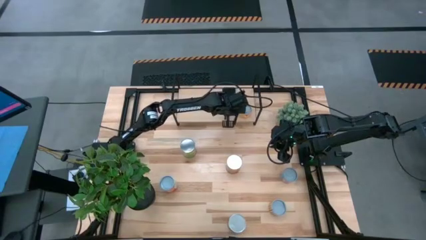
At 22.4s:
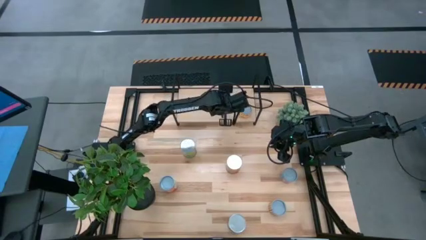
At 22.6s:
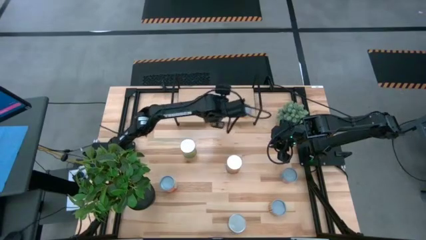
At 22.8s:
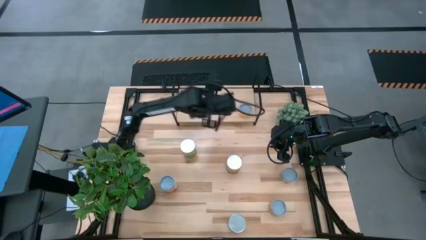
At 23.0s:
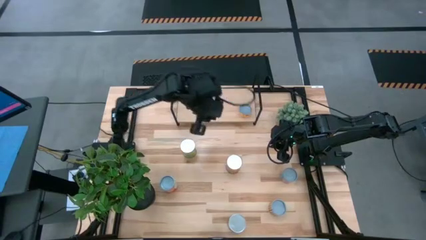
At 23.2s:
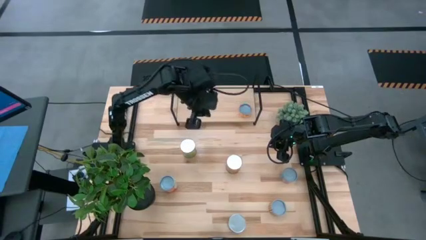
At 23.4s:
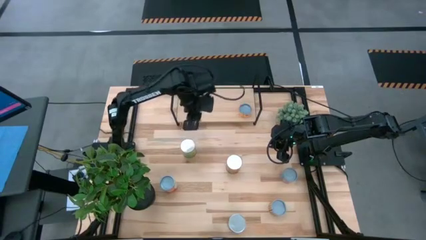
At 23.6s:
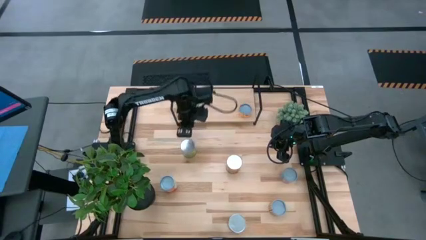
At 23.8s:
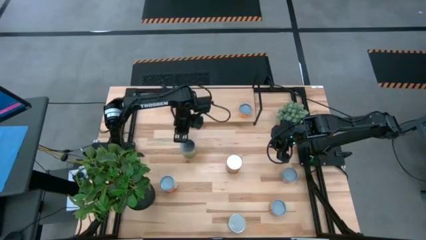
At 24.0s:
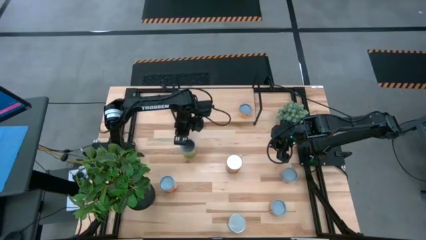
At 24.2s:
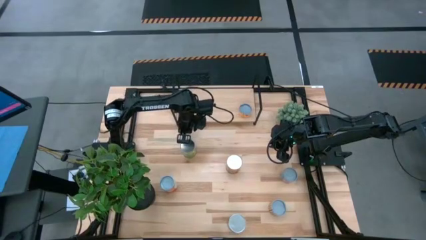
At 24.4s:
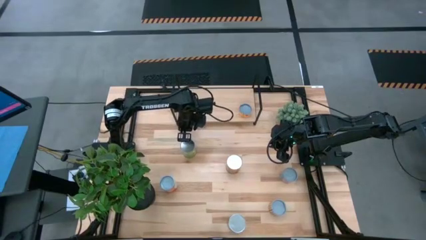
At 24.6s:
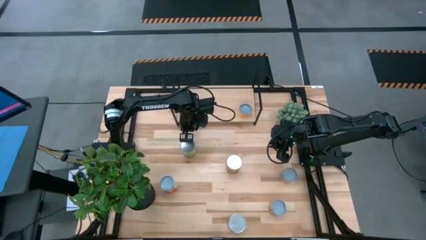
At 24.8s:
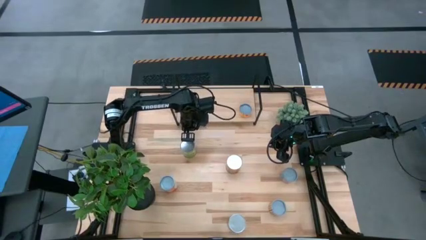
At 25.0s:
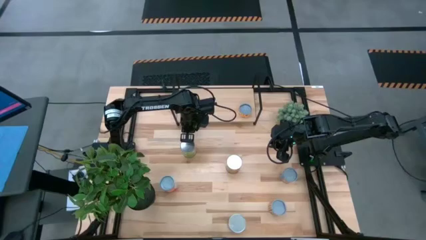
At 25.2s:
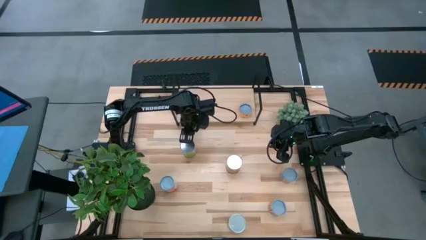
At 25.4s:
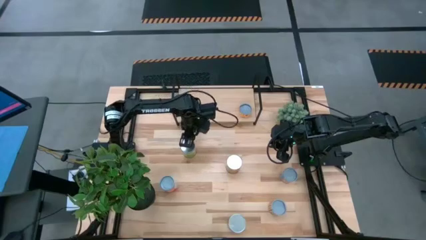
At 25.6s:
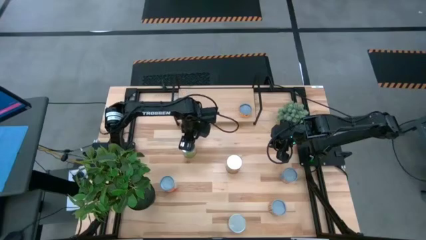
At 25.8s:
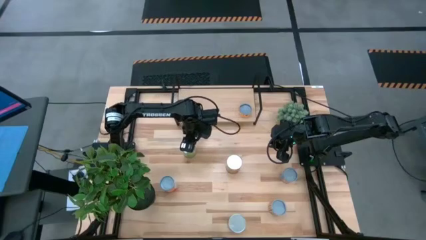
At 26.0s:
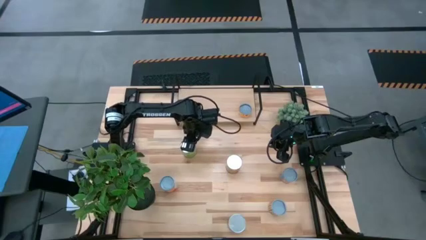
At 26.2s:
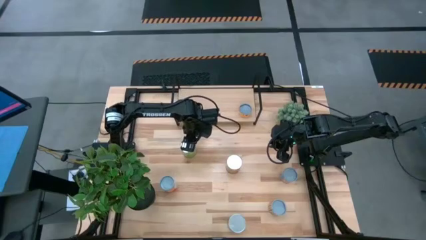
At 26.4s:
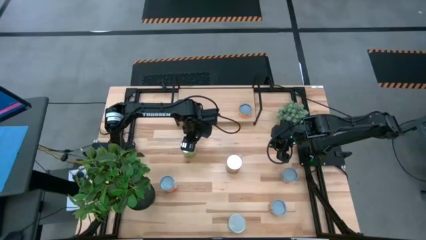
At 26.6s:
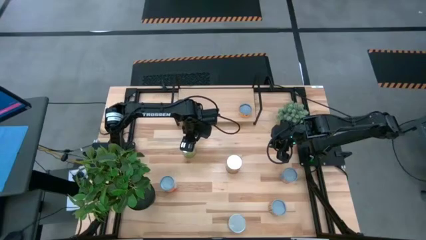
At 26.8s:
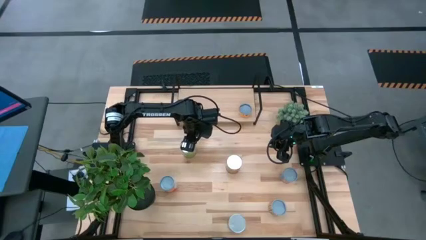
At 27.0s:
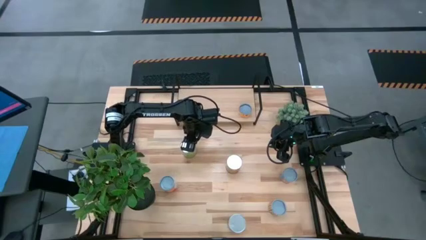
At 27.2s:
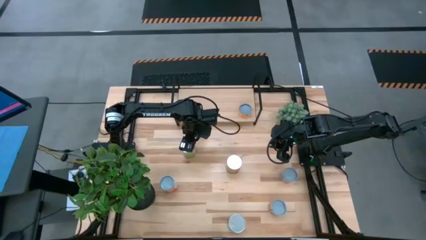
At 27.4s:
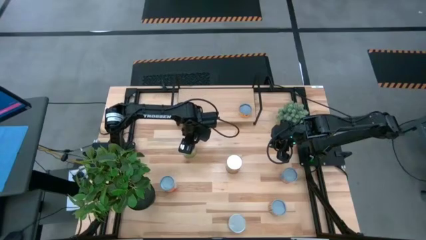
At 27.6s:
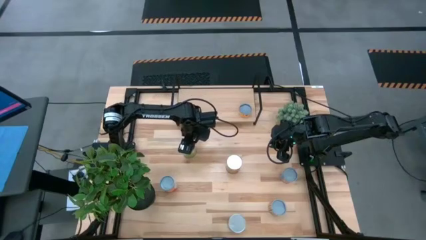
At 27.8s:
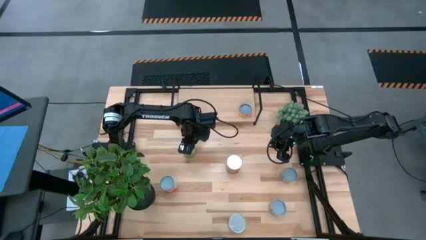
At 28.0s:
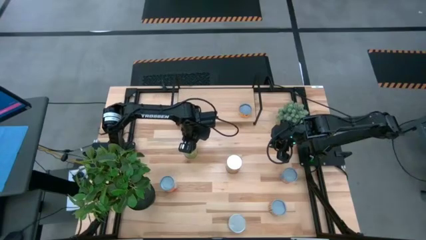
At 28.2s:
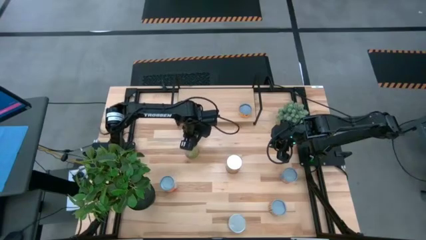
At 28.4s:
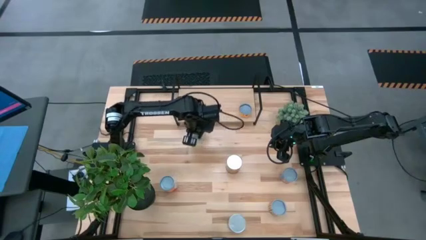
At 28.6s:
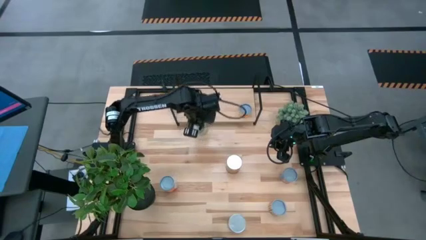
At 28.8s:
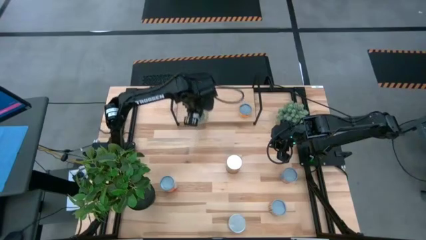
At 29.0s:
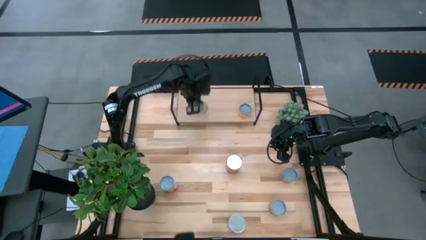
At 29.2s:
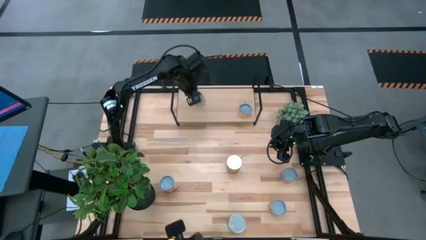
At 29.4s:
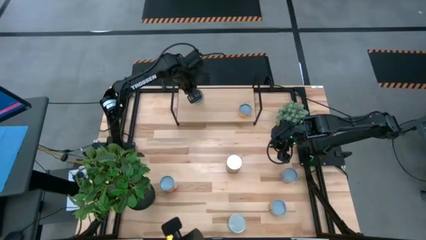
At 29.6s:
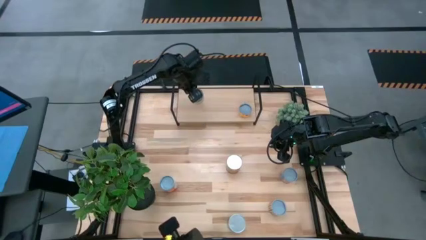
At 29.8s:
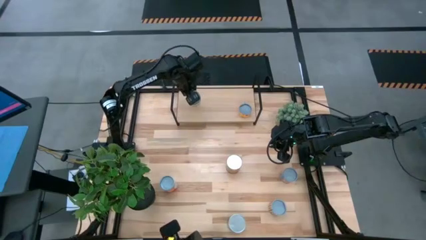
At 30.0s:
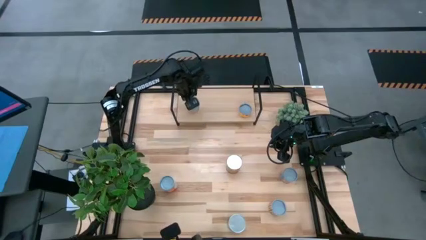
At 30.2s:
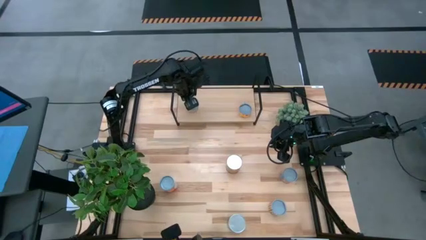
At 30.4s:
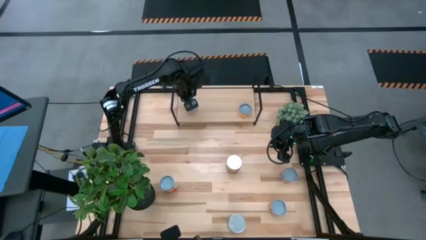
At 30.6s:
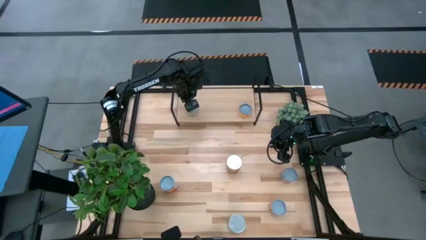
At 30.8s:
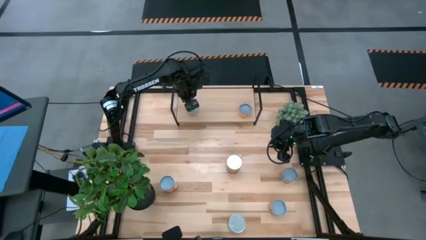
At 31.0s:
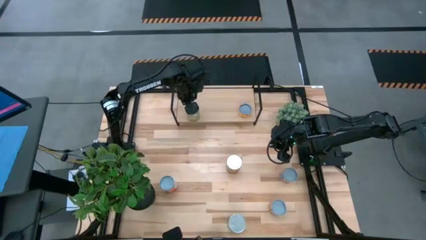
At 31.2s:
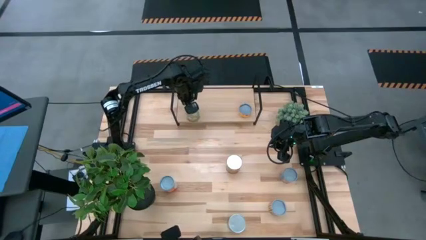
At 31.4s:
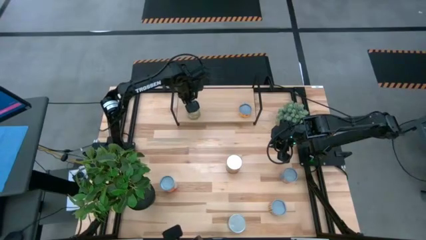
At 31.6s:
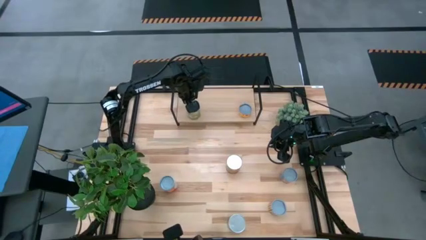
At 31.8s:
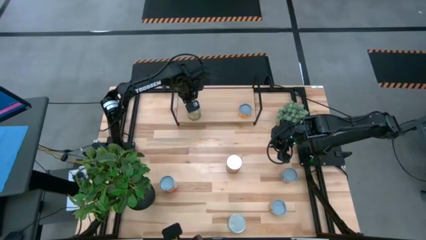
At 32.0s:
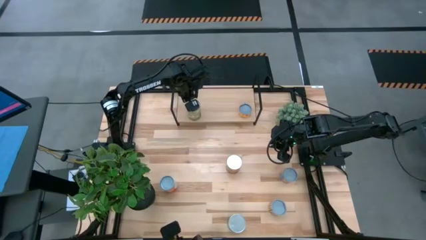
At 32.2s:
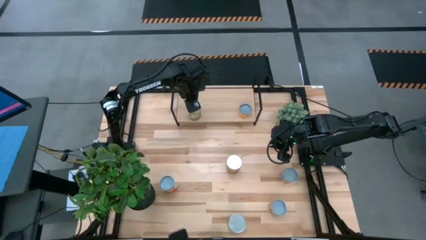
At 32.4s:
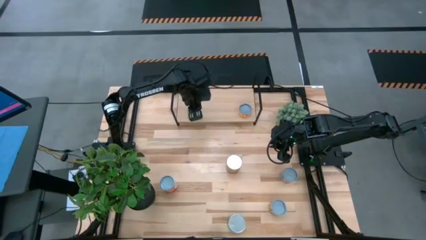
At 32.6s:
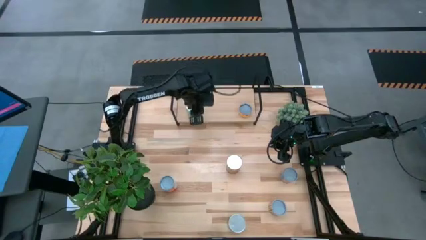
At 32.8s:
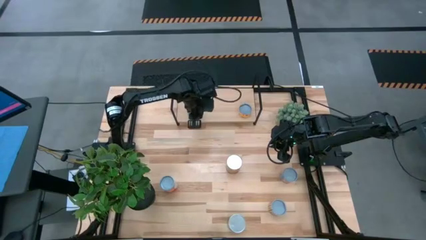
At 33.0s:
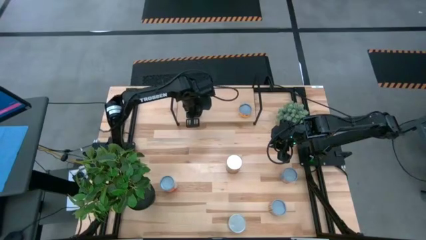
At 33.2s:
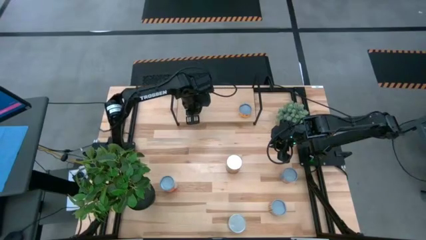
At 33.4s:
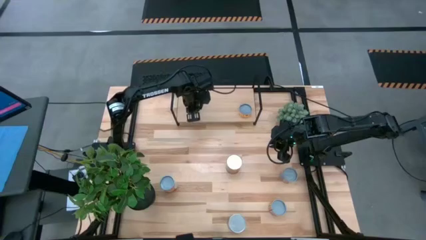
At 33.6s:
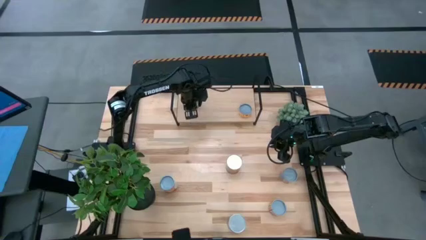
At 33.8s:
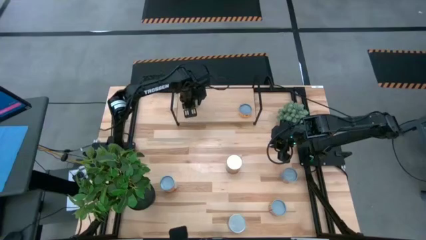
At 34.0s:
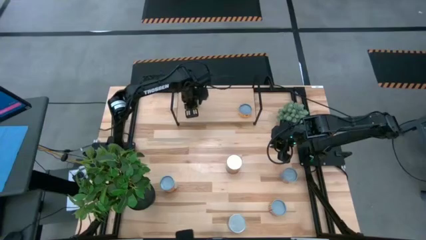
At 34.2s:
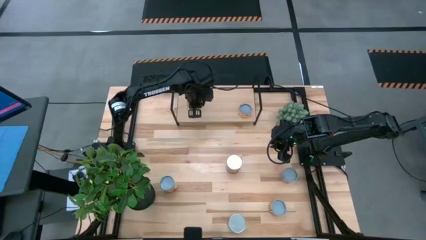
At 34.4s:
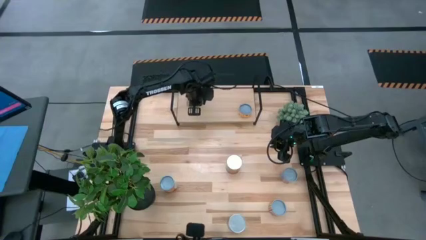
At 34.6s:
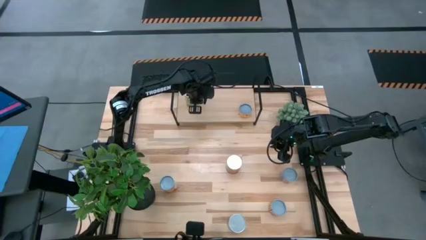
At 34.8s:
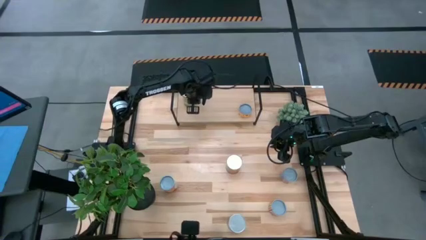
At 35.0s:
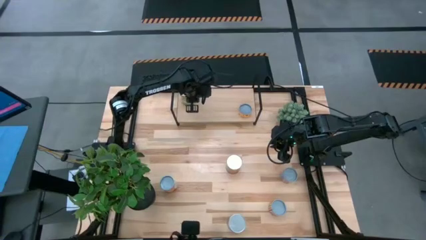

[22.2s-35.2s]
Task: Pick and place cans onto a shelf
Put the canned pears on the shelf
